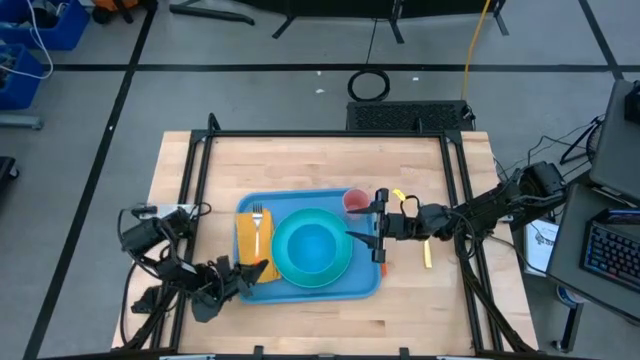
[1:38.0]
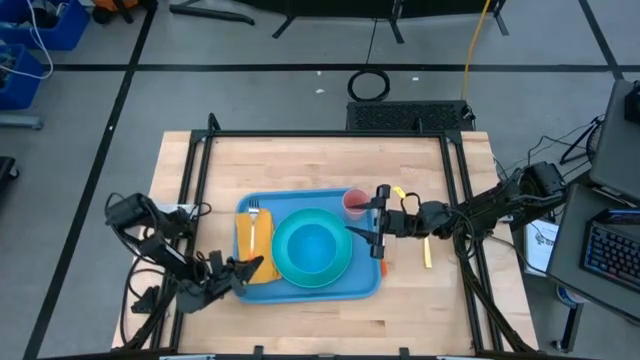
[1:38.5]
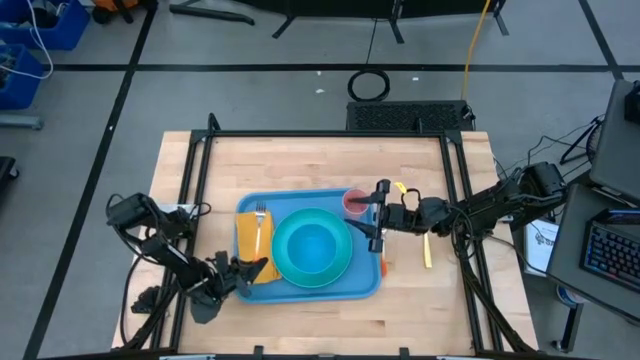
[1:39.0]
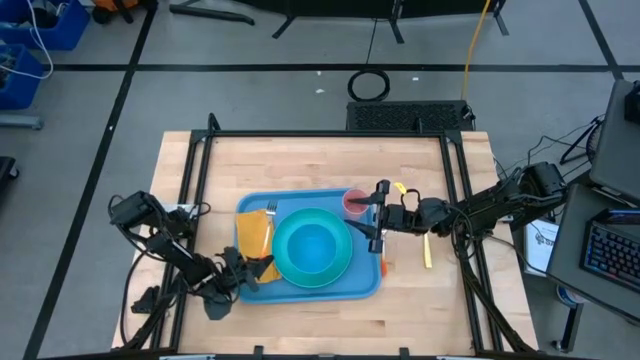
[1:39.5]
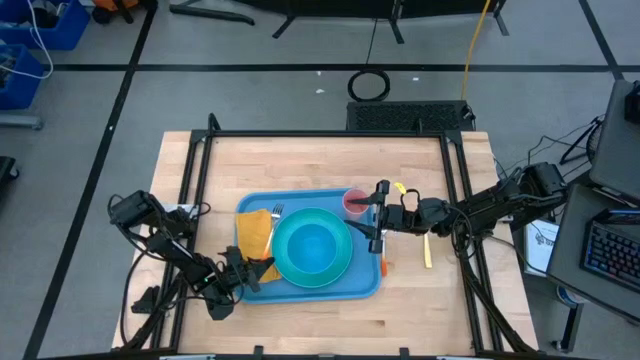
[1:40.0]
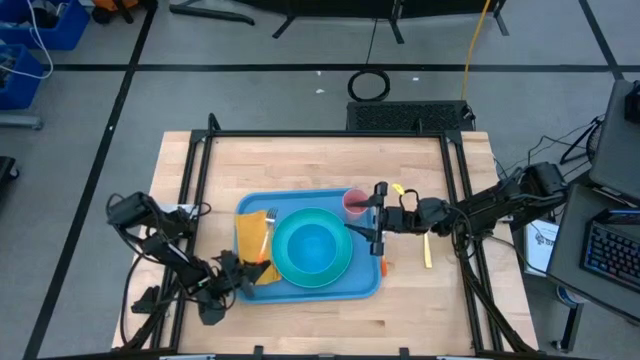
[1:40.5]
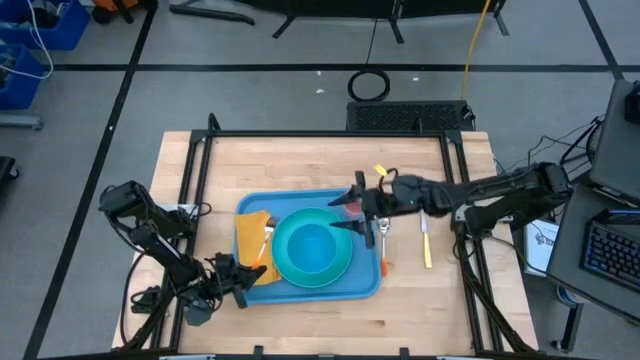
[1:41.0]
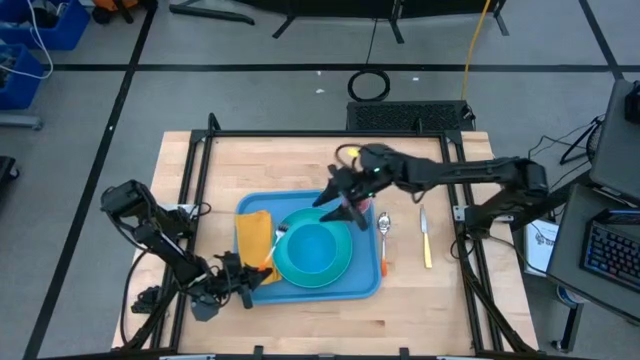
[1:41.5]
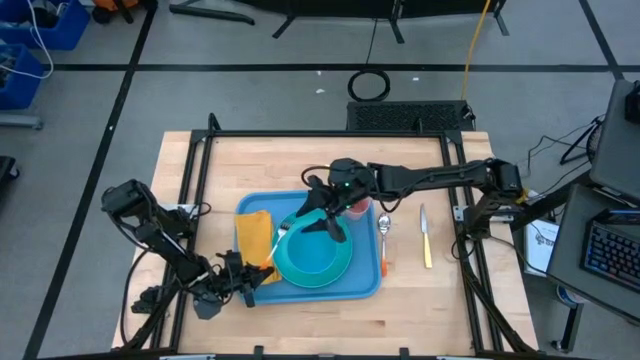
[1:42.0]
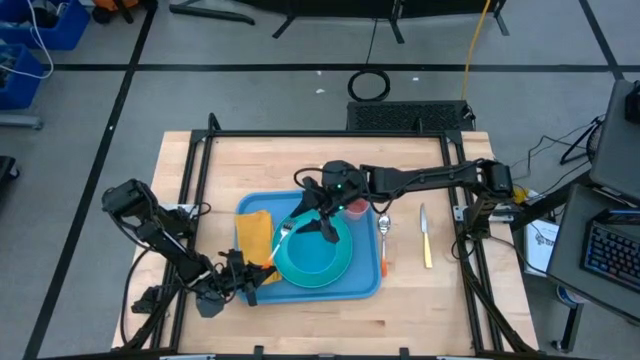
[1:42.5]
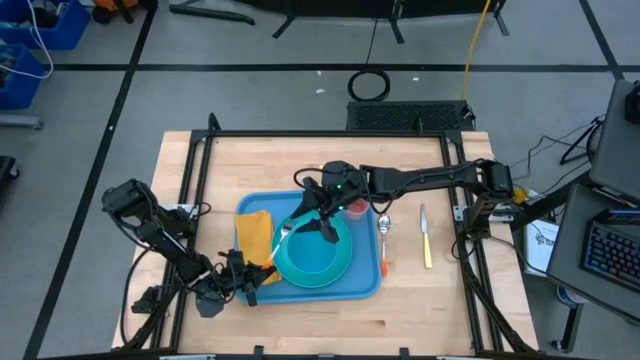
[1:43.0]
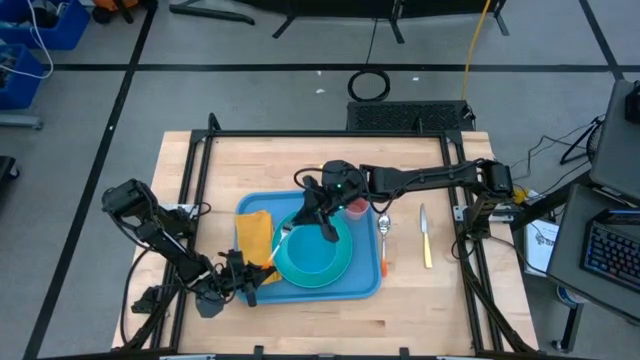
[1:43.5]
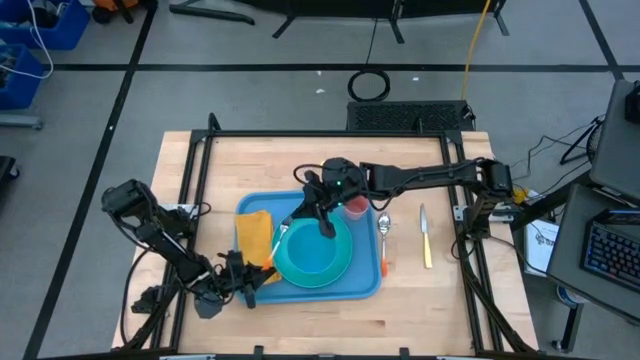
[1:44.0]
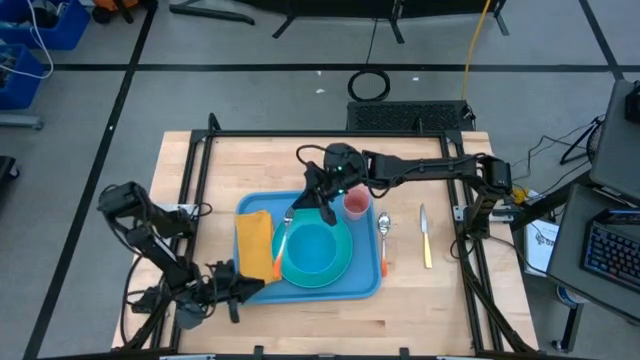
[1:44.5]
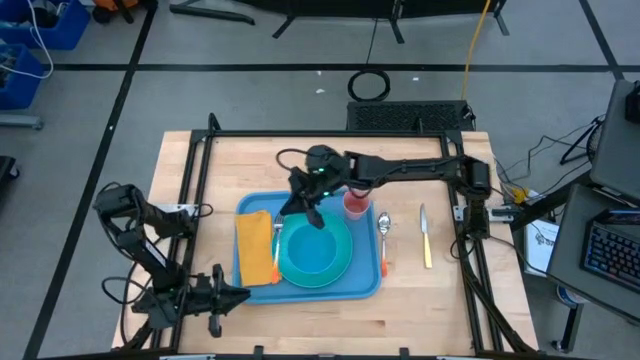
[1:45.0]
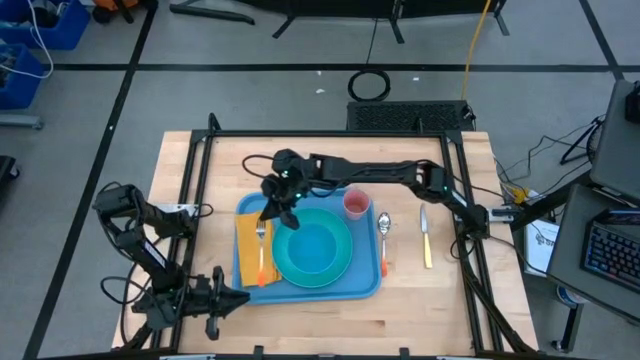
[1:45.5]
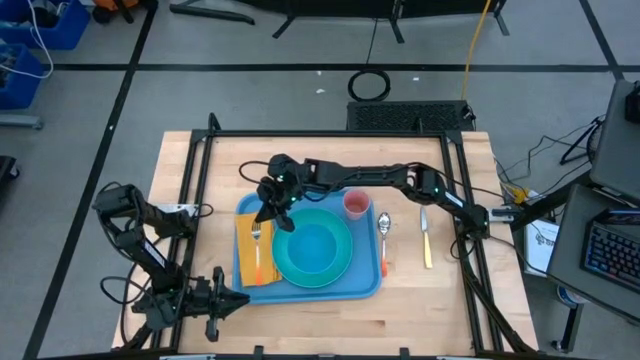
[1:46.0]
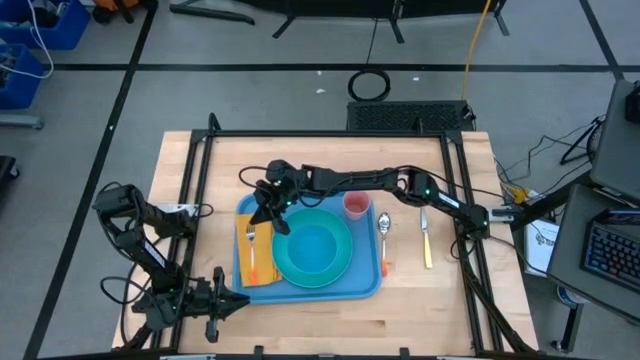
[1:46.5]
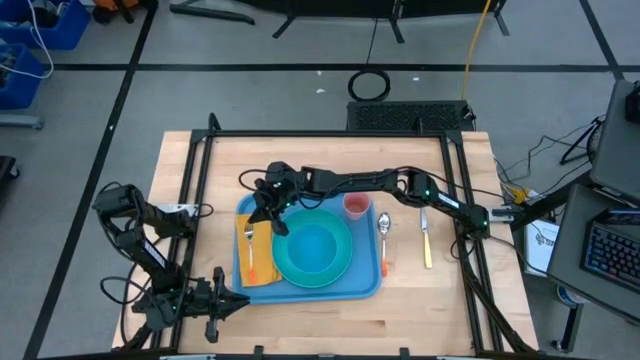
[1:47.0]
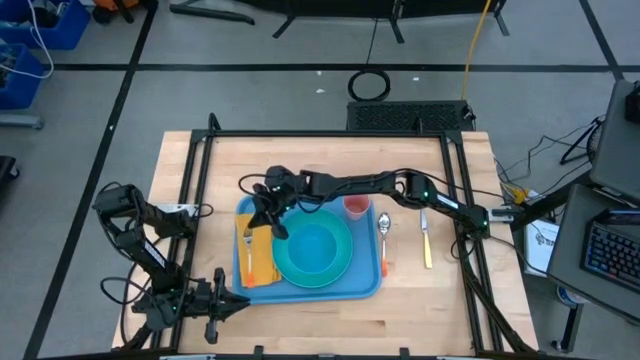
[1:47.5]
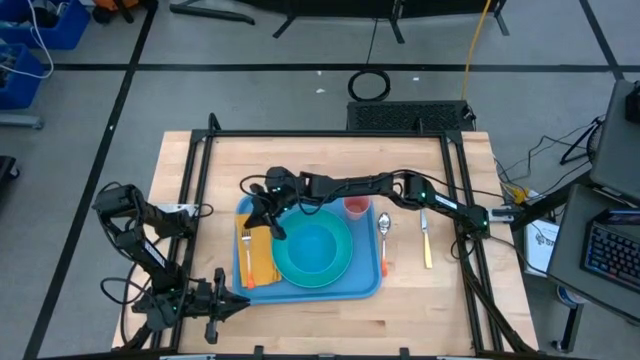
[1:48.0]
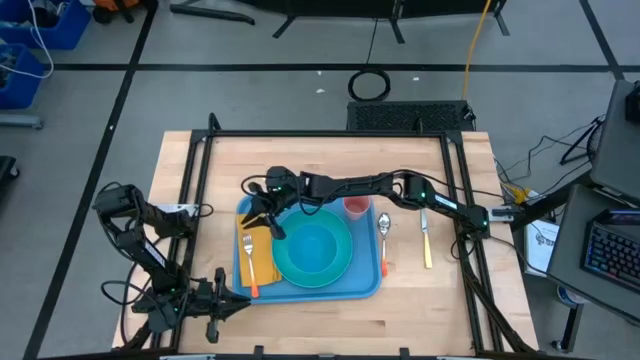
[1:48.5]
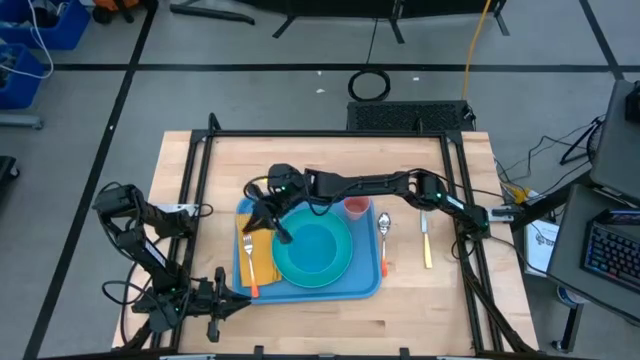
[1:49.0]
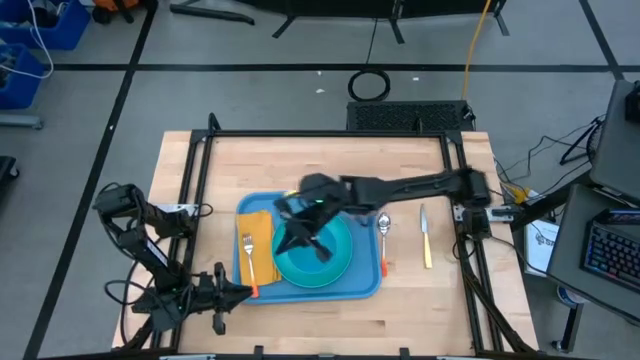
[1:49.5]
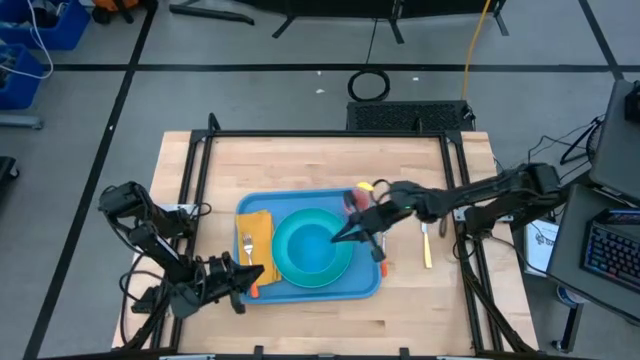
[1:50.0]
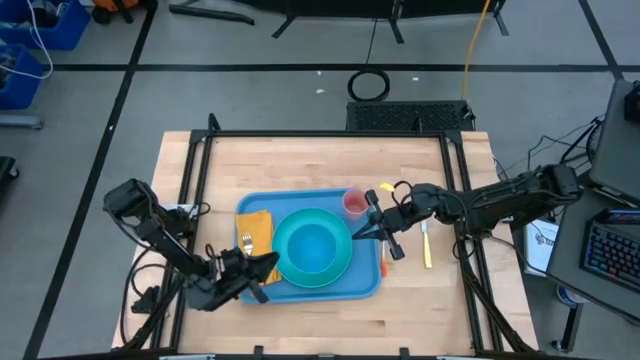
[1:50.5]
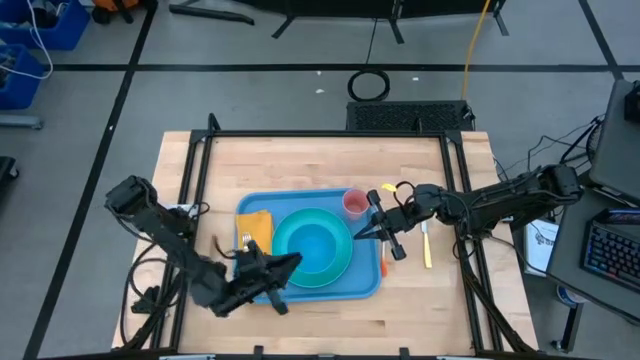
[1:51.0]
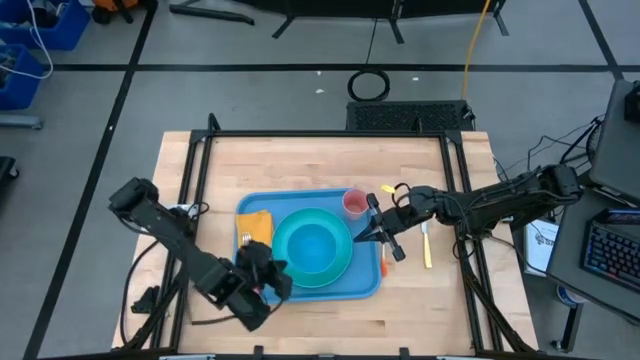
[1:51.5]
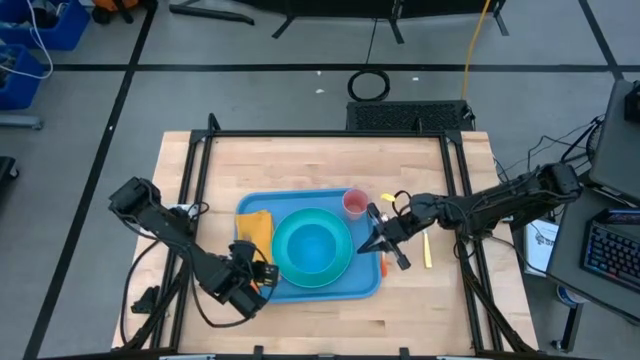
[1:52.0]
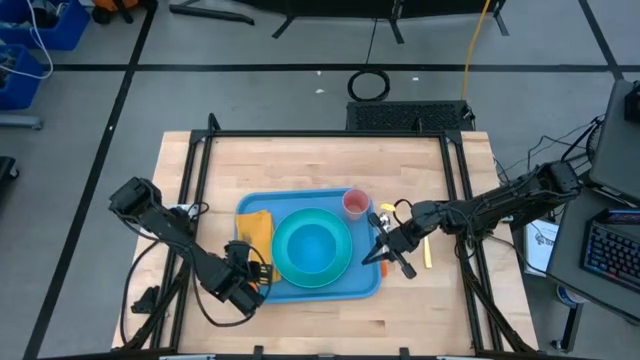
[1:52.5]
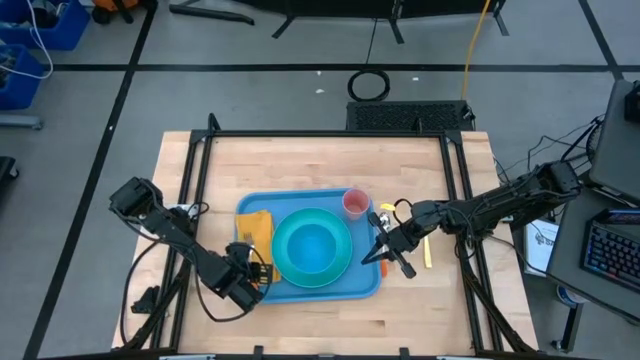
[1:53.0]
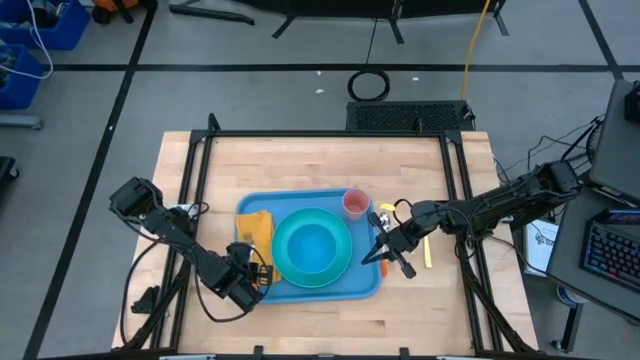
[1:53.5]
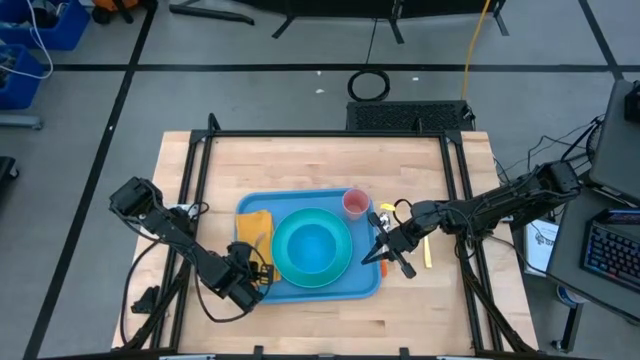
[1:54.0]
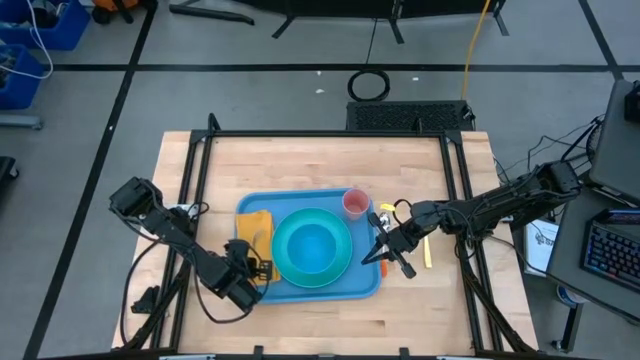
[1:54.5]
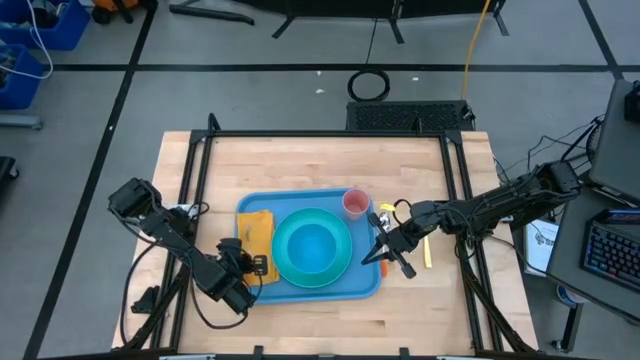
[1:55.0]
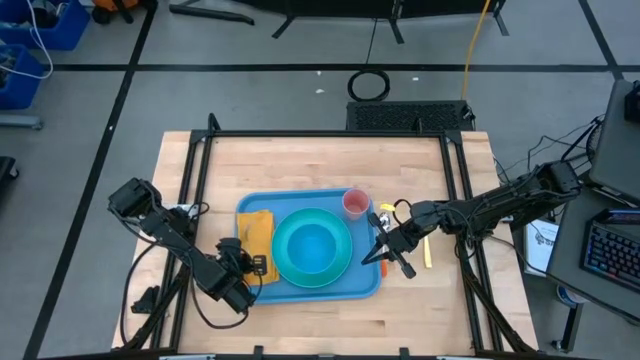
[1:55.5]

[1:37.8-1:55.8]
Task: Set up tray
Put the orange fork on the yellow napkin
